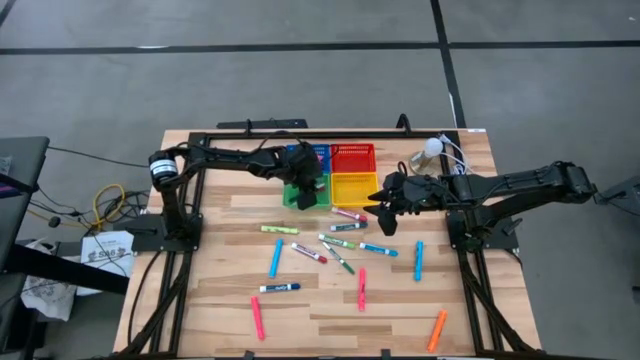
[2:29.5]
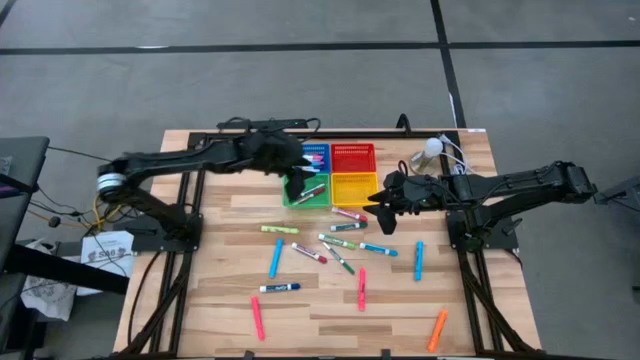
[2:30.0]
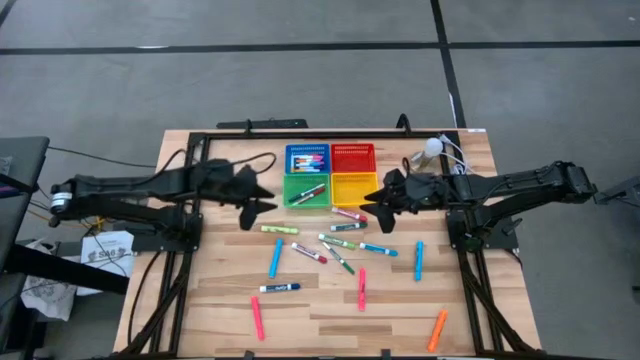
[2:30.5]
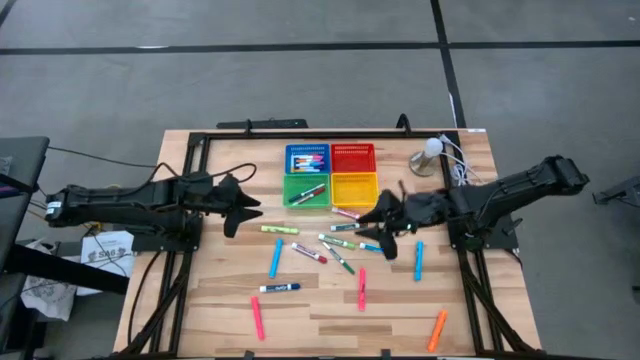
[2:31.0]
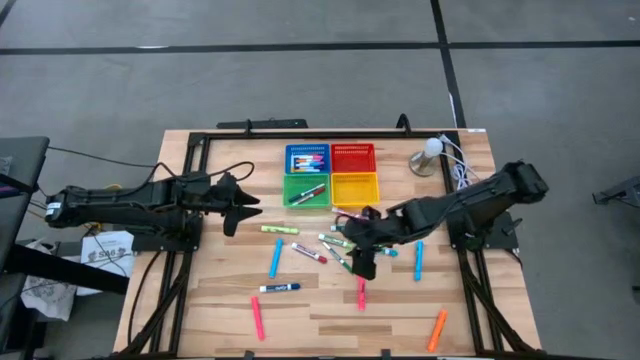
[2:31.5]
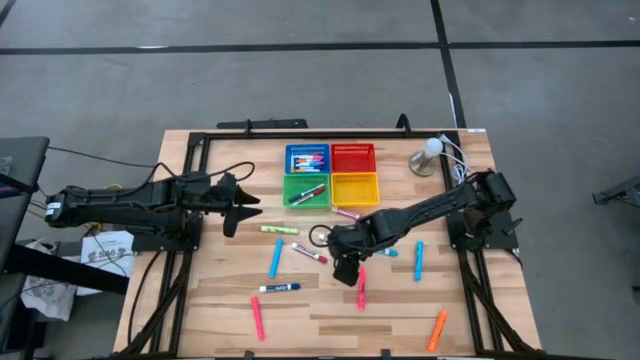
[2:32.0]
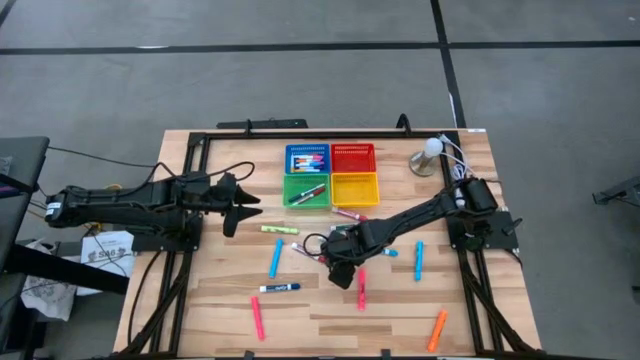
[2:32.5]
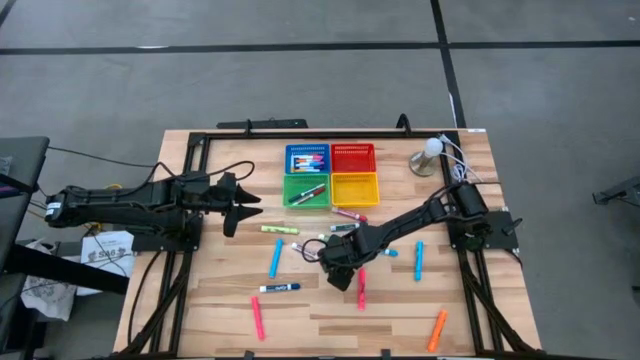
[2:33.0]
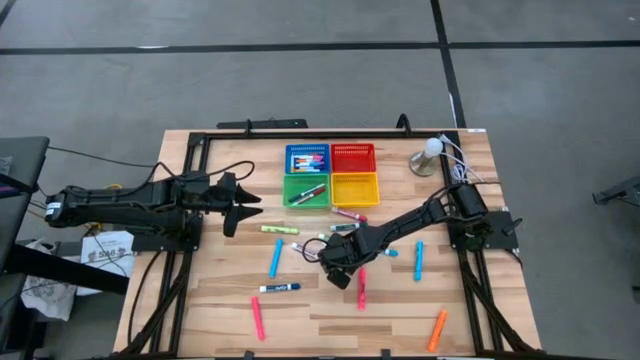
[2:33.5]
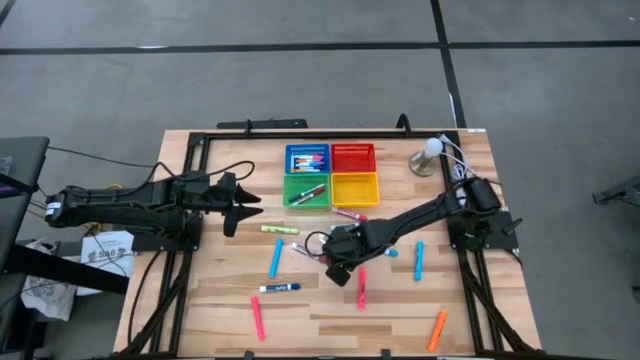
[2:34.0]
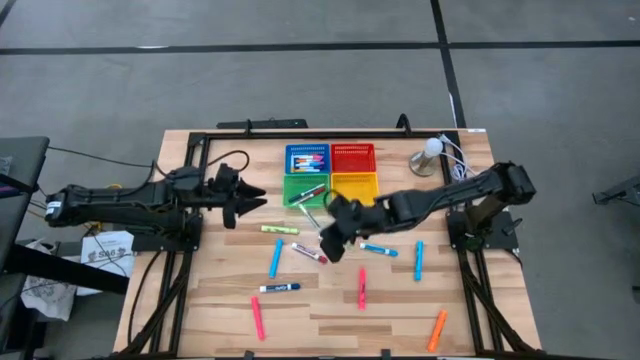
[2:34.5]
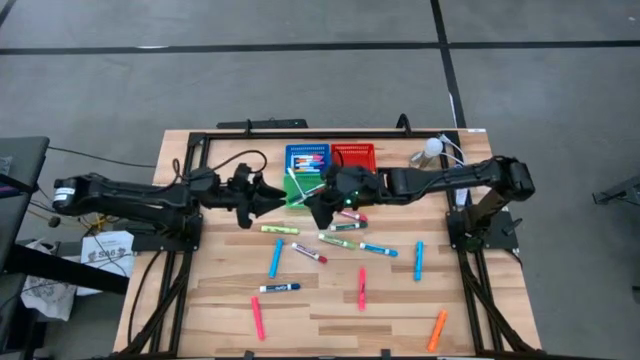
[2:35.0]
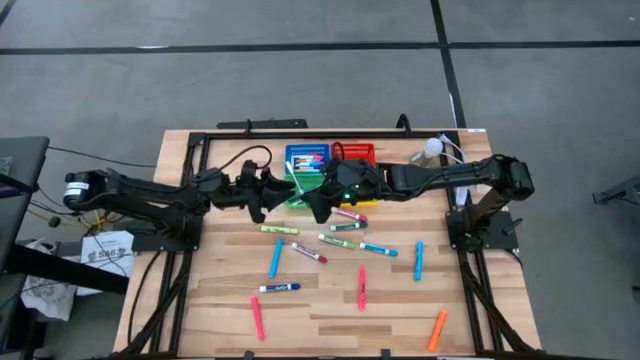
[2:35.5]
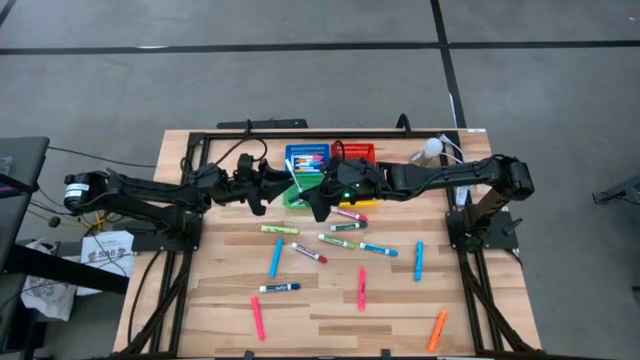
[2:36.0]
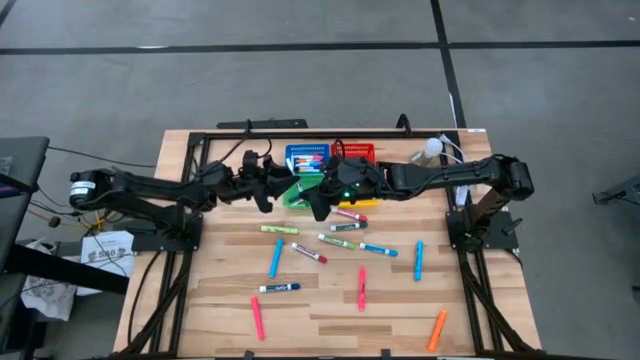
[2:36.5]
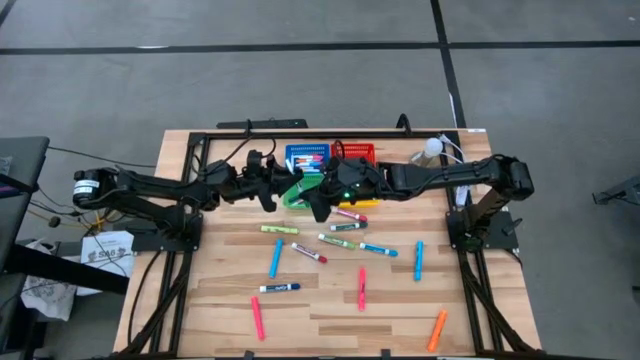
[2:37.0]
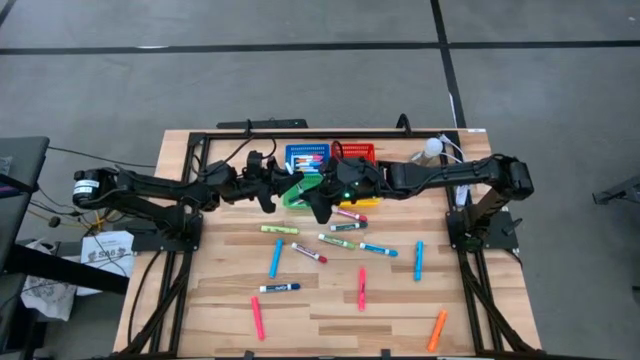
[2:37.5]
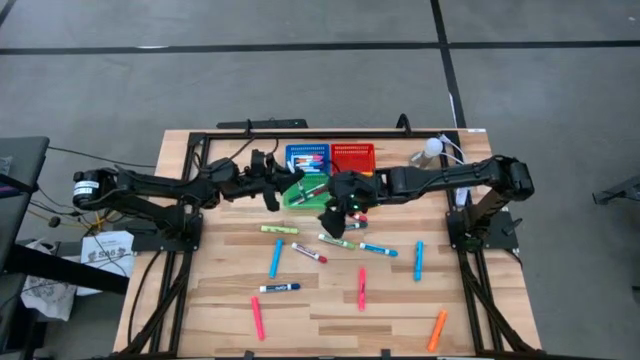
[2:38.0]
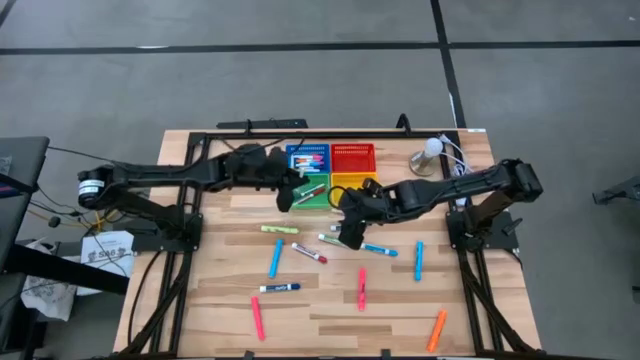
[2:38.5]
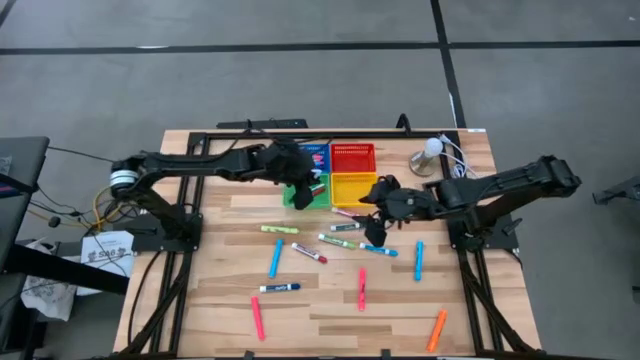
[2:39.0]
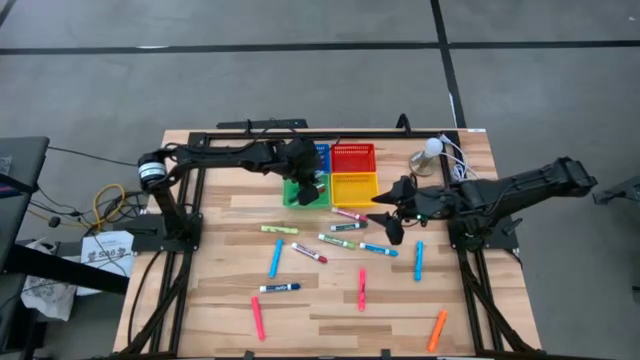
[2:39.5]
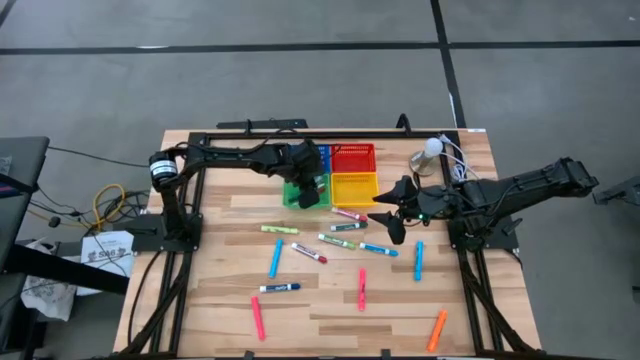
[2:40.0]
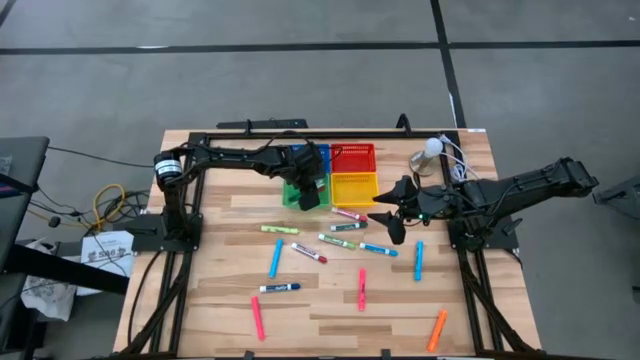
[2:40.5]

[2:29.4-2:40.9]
Task: Pick & Place Markers
Put the medium green marker into the green bin

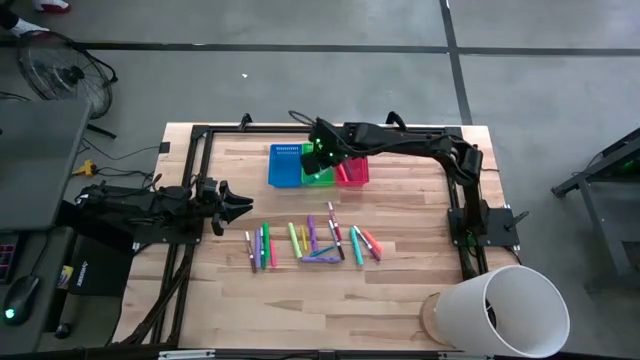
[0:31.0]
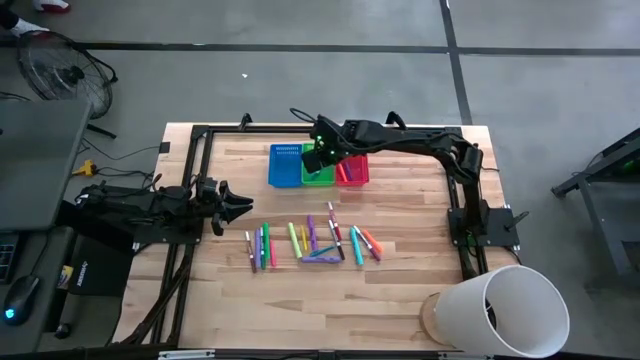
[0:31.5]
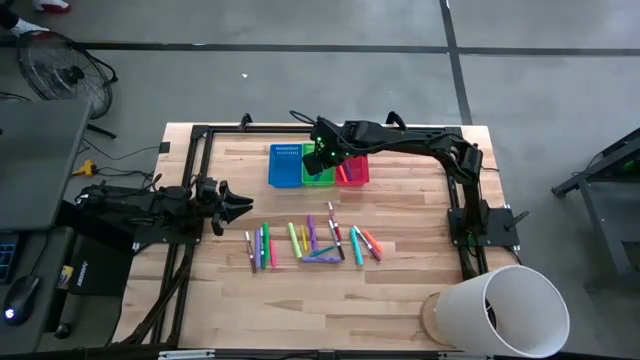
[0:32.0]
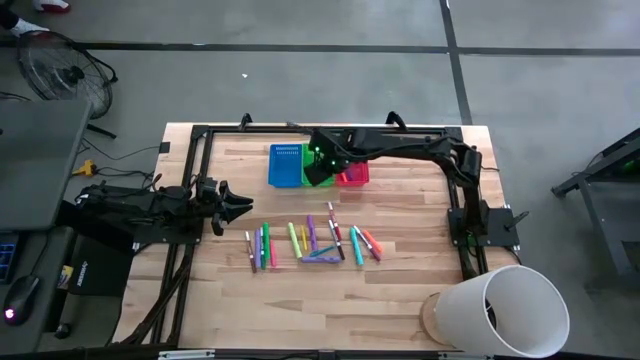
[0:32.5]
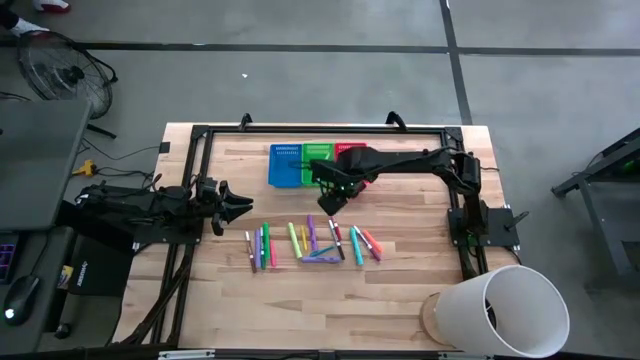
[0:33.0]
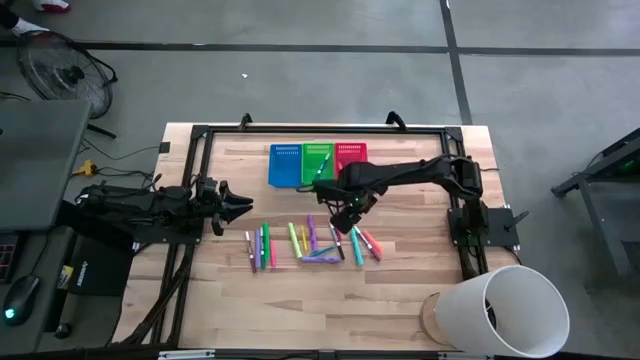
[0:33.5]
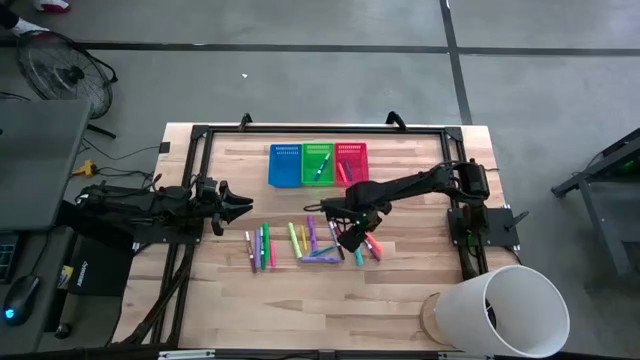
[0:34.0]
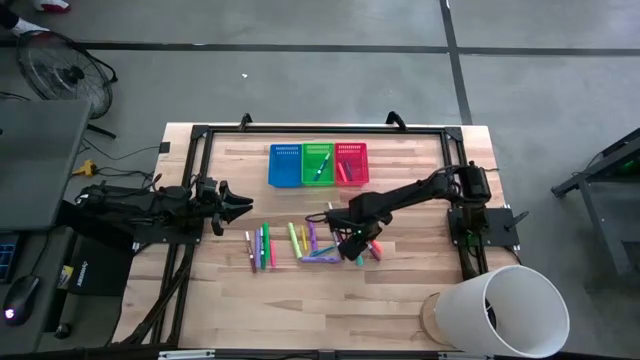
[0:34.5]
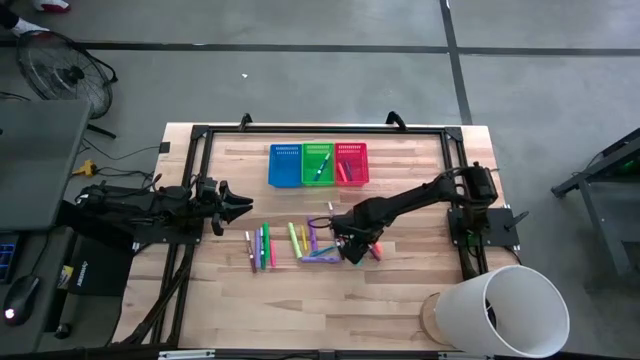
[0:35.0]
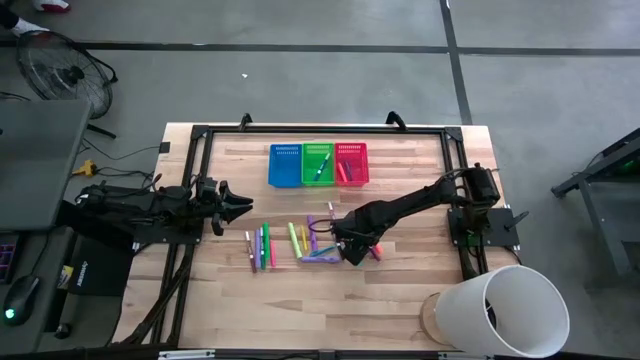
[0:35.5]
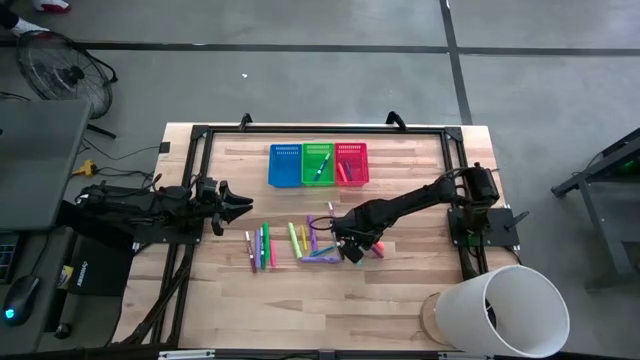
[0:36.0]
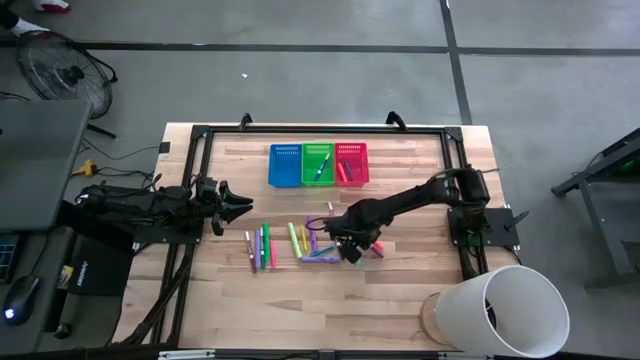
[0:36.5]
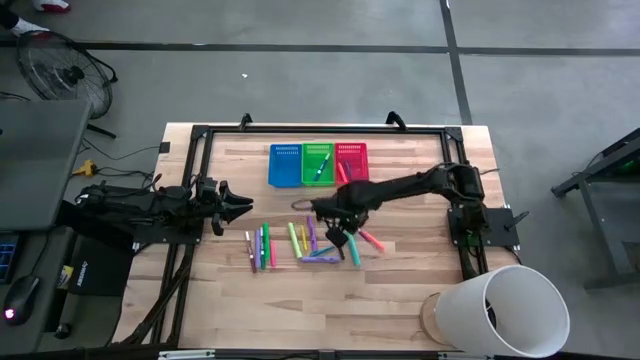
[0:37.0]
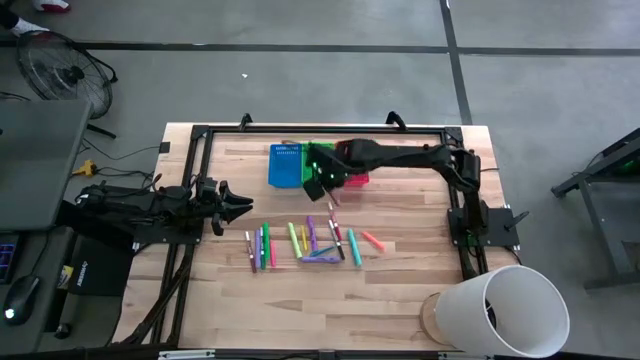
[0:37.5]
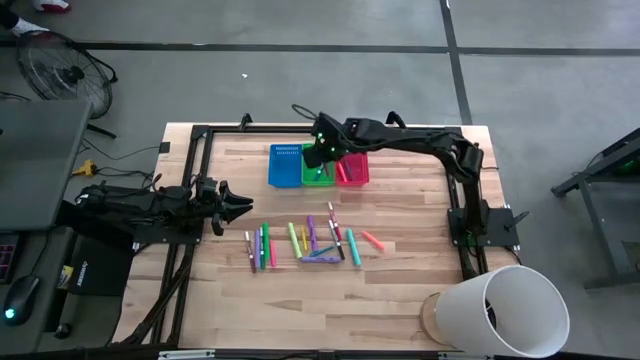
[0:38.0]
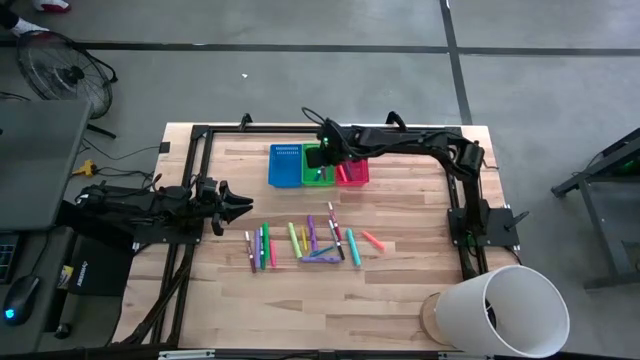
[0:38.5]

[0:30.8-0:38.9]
Task: Pick & Place Markers
Put the purple marker pen into the green bin
